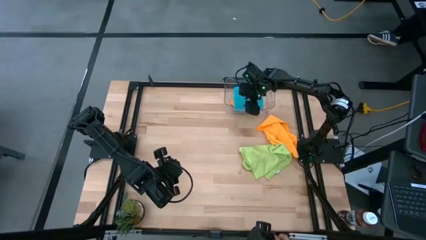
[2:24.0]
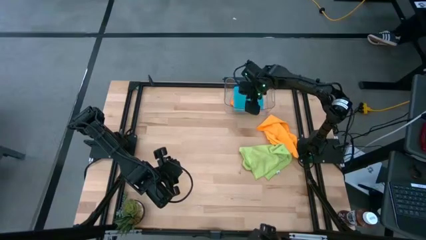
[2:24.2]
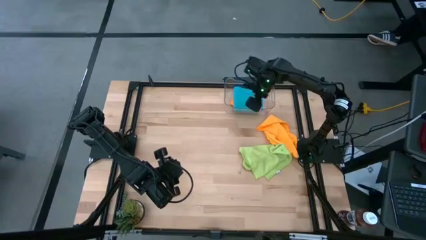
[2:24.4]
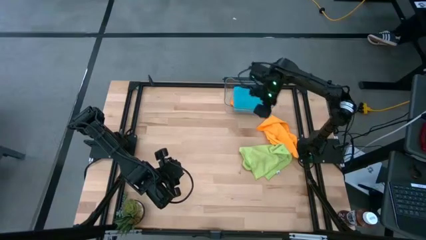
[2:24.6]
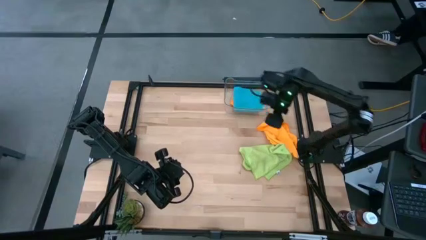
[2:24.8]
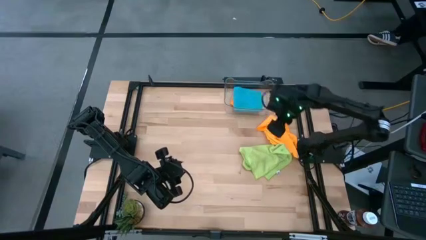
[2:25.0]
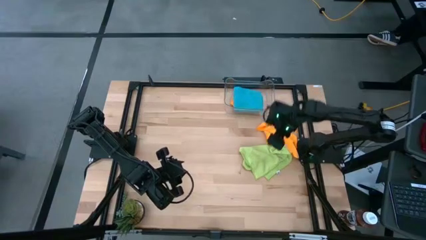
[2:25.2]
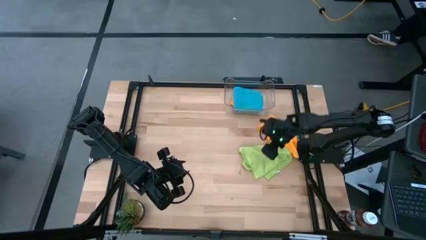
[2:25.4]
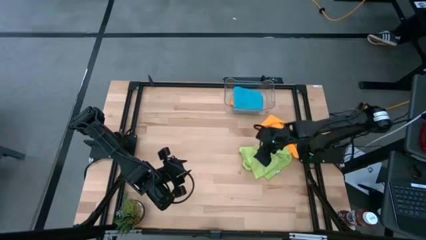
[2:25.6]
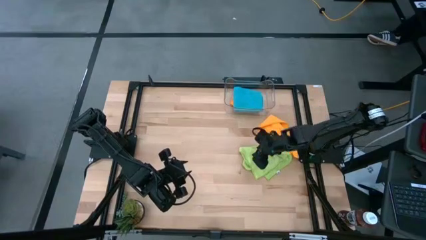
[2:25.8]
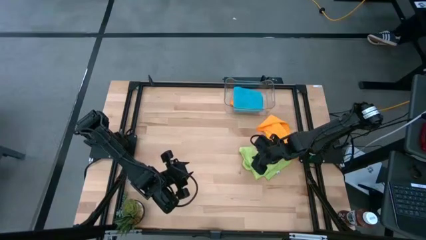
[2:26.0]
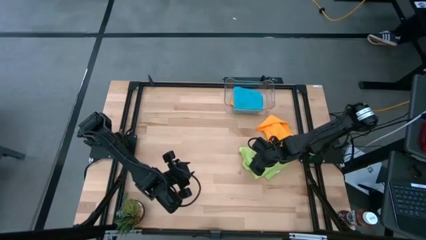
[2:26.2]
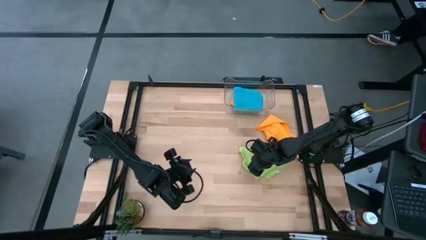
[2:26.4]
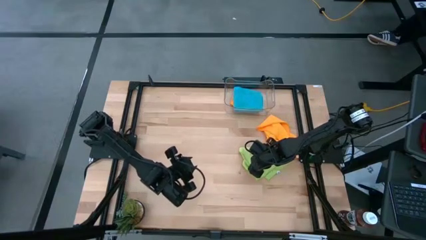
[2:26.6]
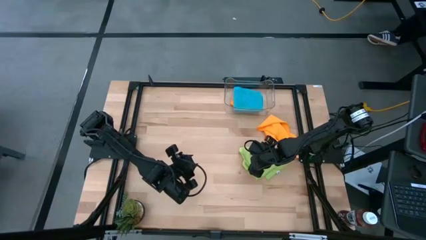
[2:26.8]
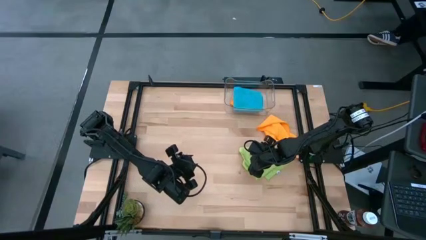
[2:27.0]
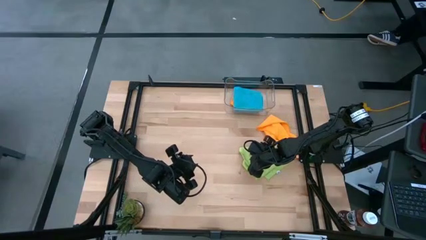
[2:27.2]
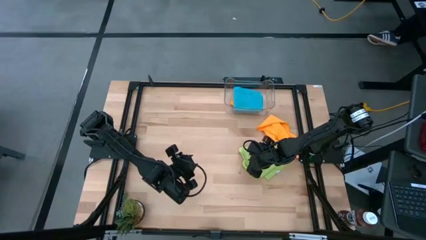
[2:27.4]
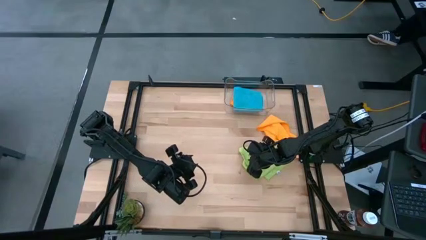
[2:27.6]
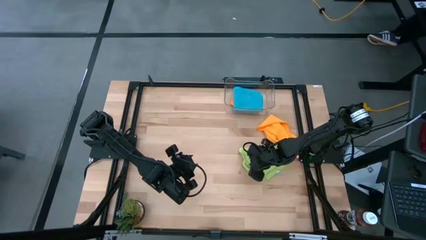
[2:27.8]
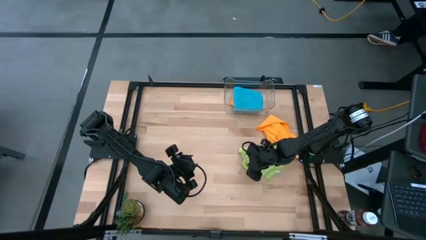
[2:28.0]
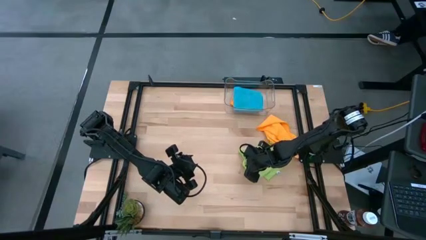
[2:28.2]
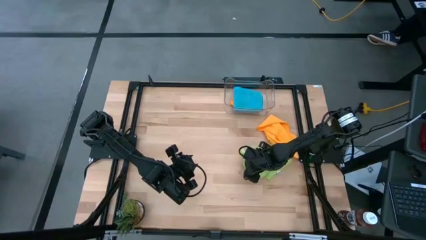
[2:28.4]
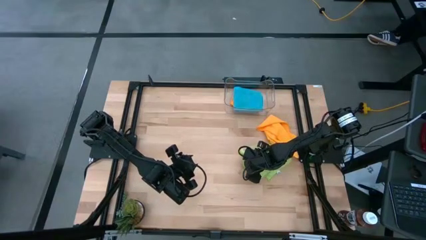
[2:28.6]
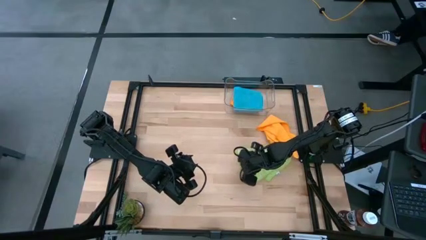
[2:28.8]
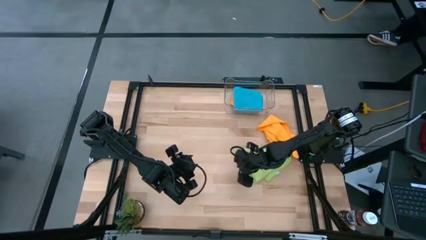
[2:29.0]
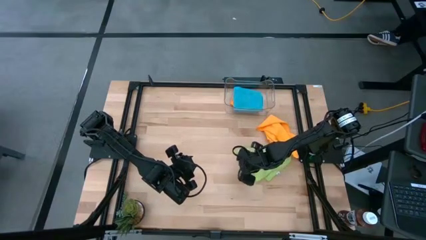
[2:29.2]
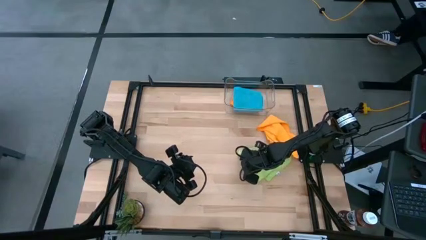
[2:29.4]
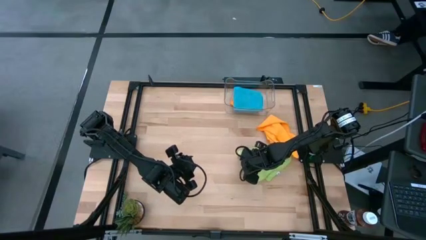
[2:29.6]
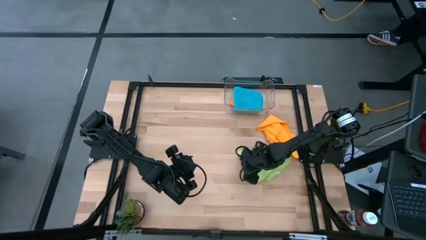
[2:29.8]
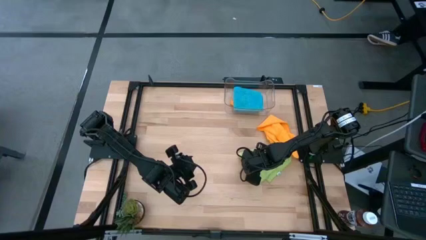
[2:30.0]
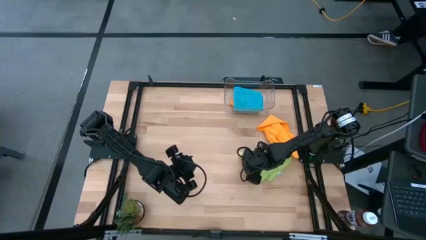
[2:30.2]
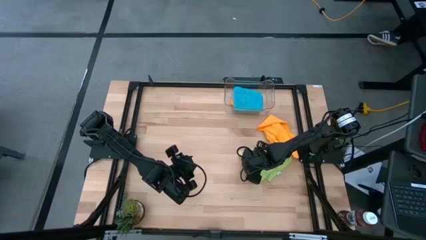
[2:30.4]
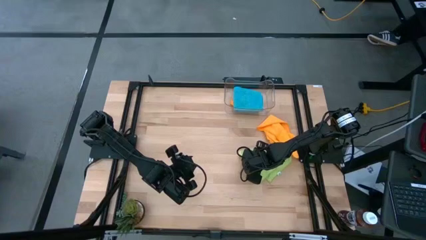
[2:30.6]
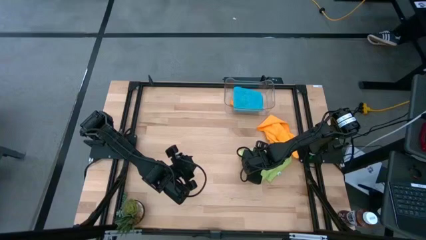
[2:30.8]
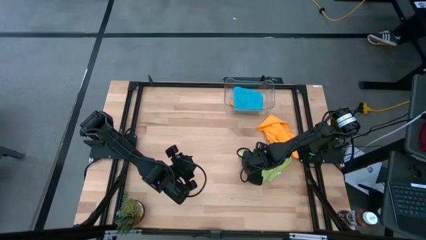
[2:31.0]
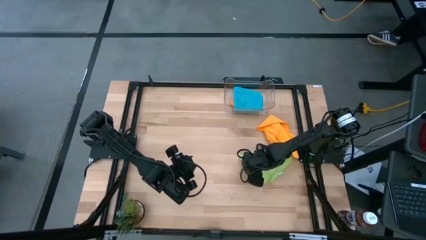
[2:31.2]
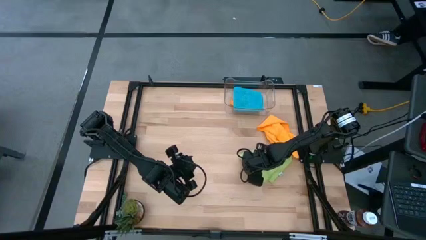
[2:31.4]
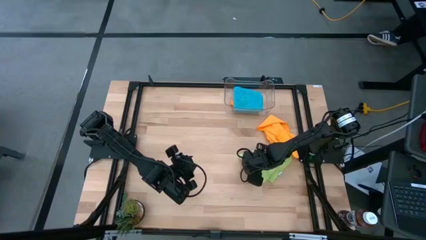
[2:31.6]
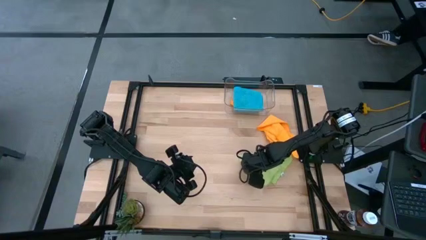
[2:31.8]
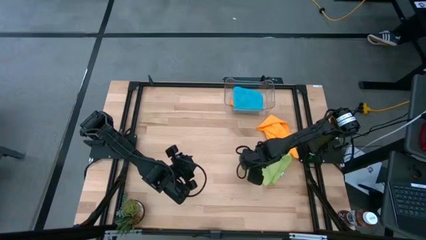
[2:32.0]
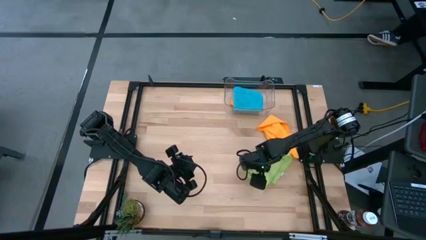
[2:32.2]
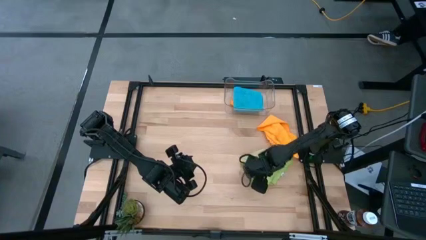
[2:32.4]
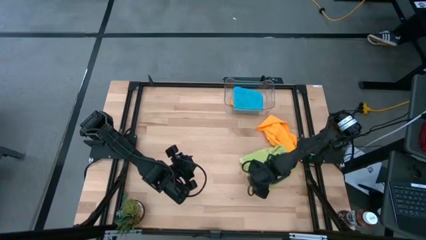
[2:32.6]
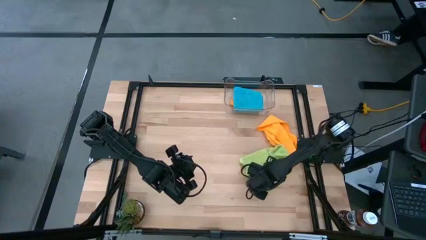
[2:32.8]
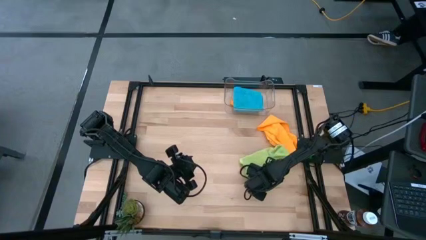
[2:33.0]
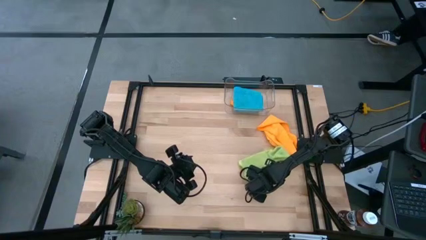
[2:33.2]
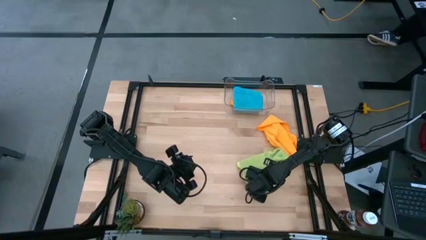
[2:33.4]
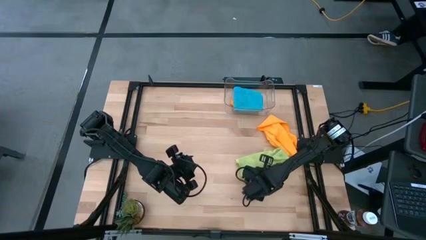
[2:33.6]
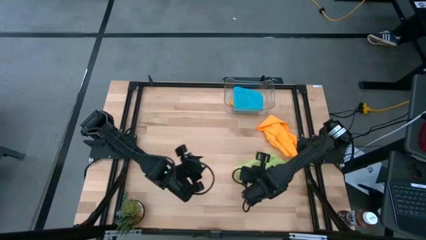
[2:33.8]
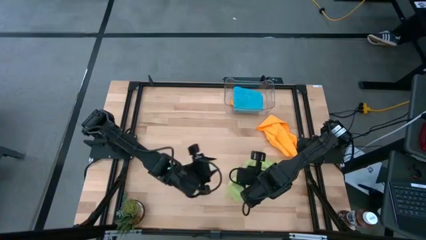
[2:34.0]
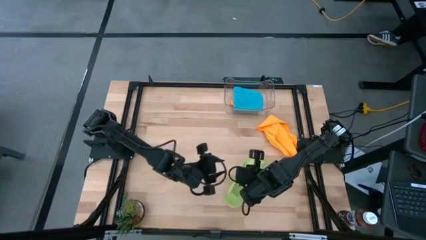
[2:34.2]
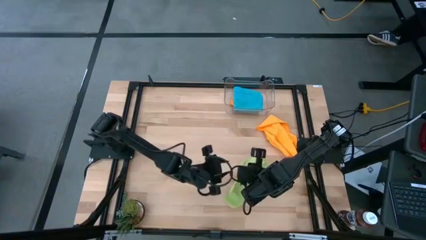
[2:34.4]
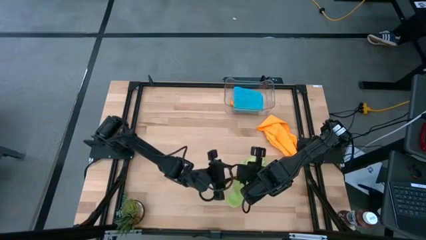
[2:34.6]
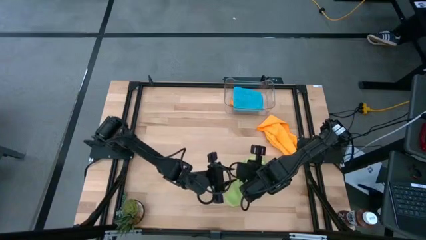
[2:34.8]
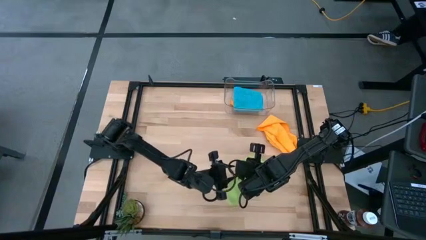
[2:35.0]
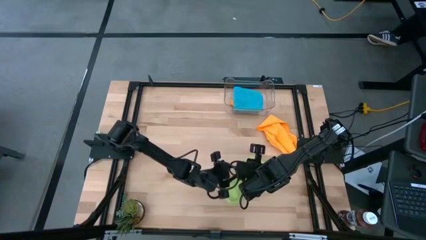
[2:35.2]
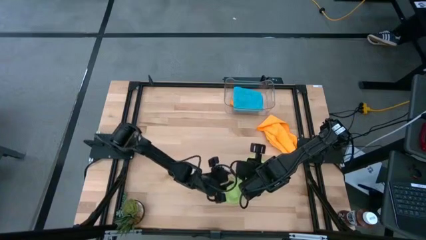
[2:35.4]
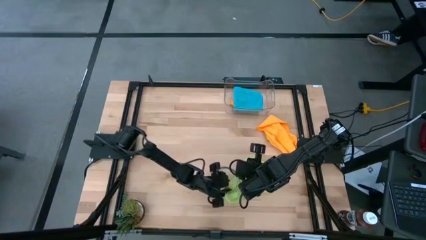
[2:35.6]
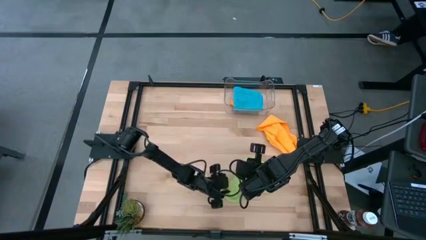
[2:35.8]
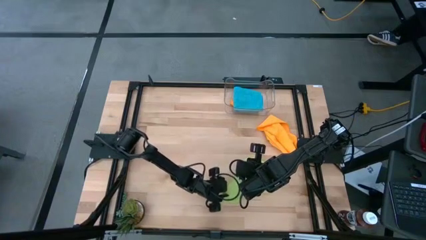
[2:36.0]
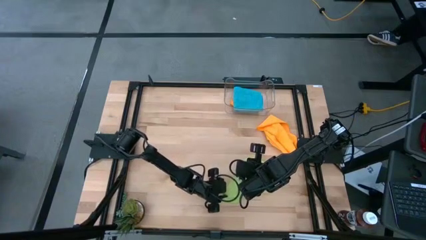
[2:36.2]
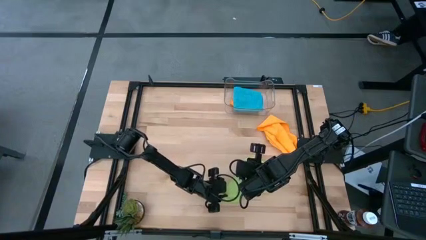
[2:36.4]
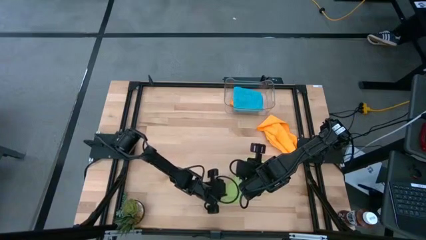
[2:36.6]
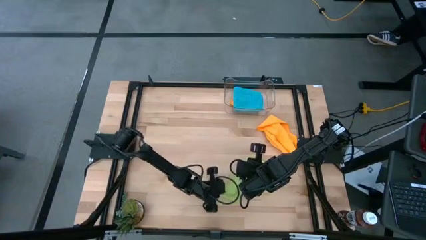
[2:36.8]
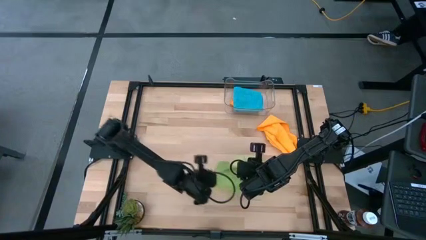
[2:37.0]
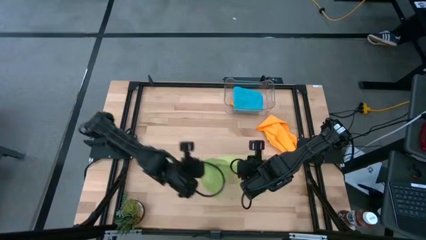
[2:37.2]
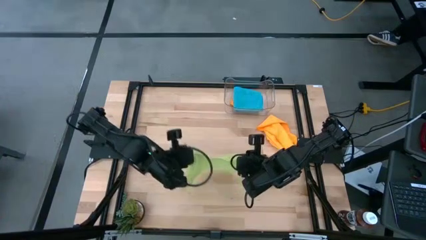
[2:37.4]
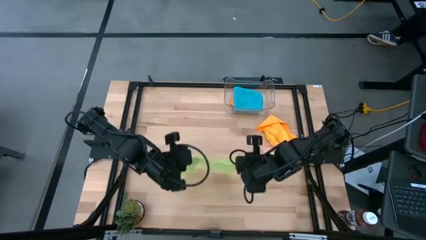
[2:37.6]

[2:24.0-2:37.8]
Task: Fold microfiber towels
Fold the green microfiber cloth
